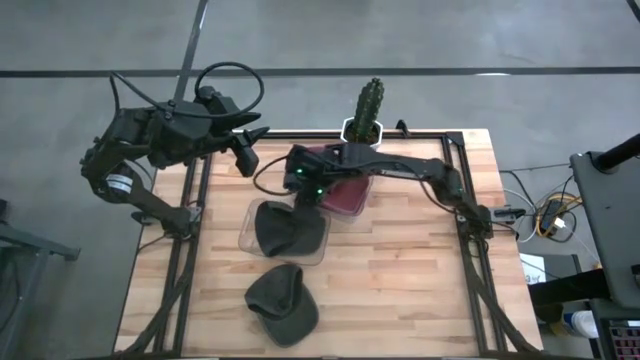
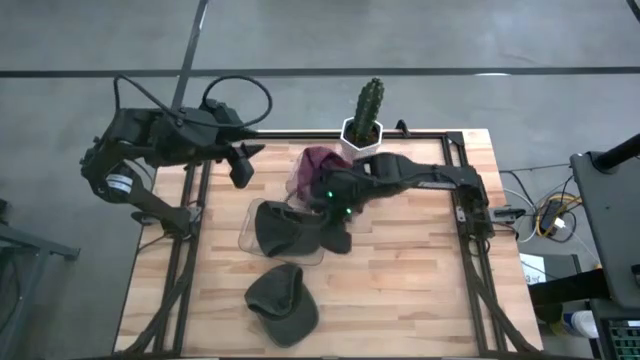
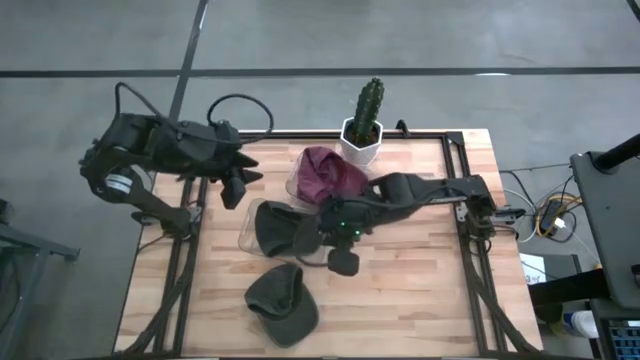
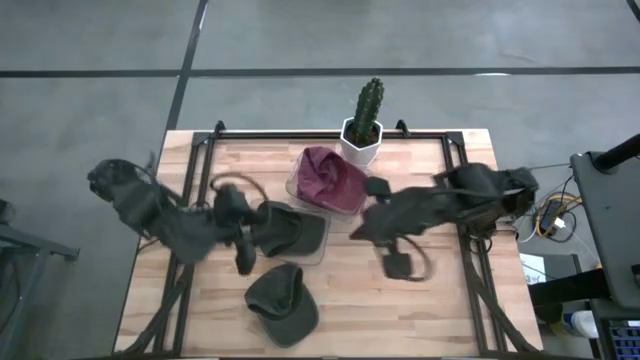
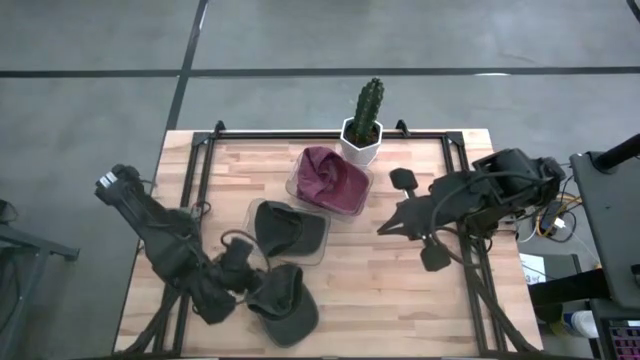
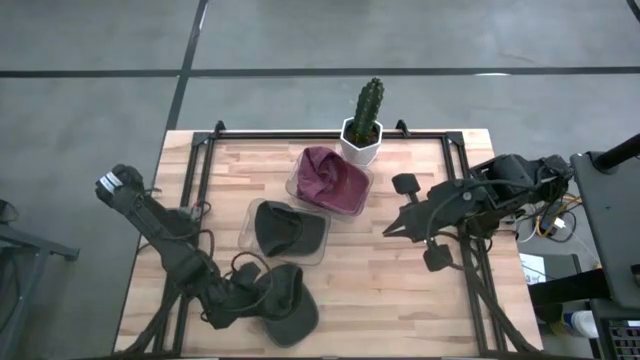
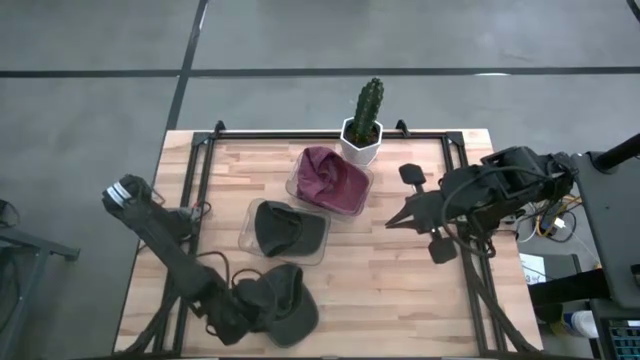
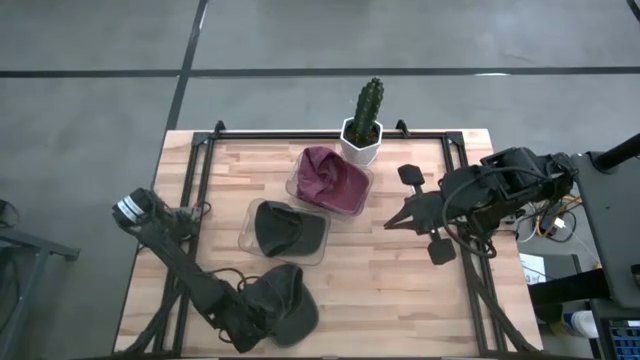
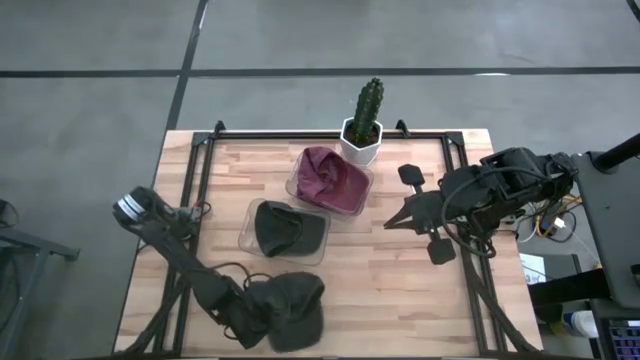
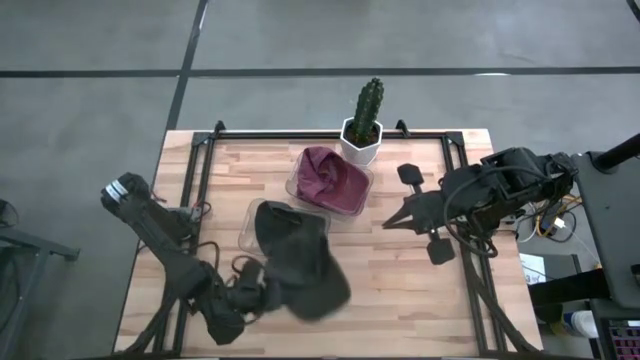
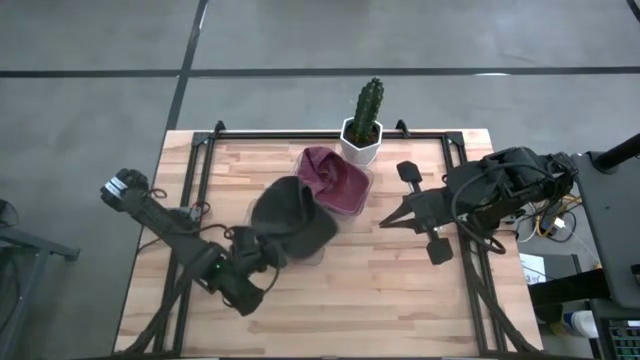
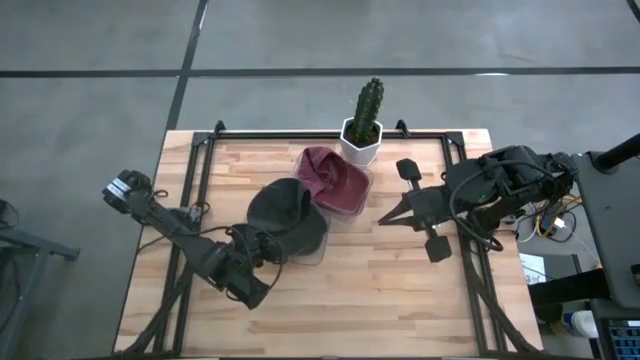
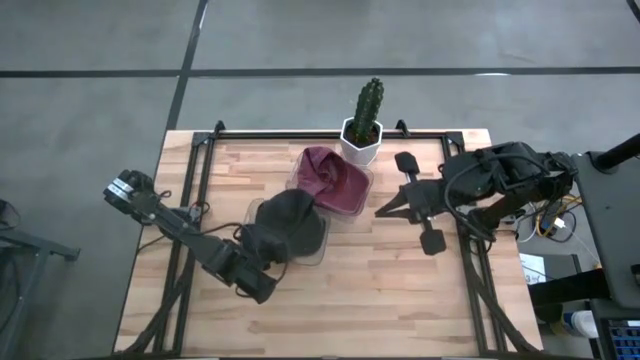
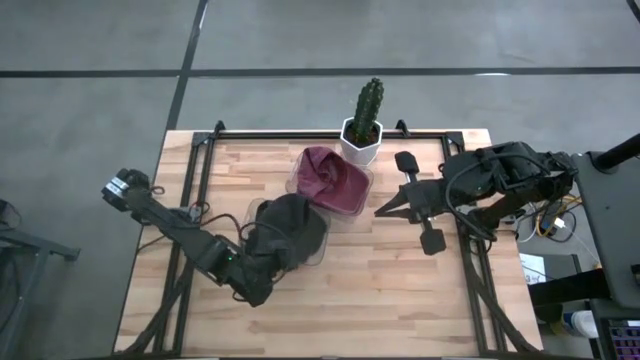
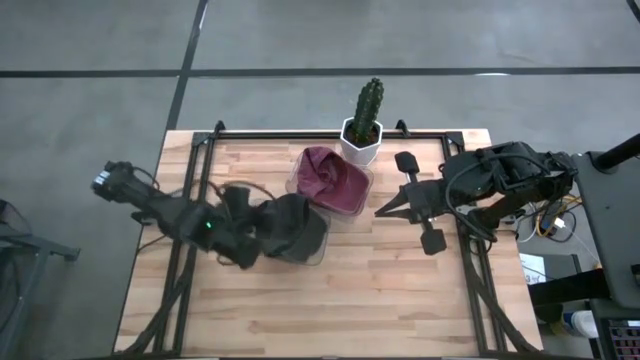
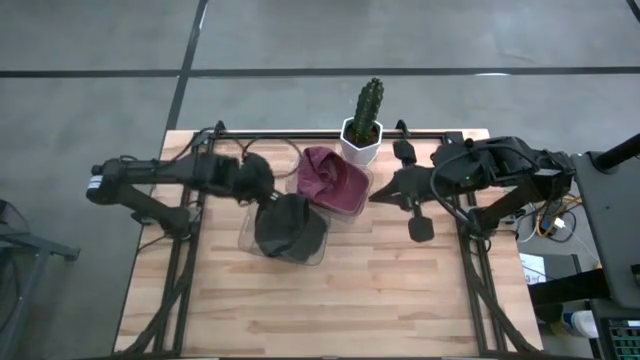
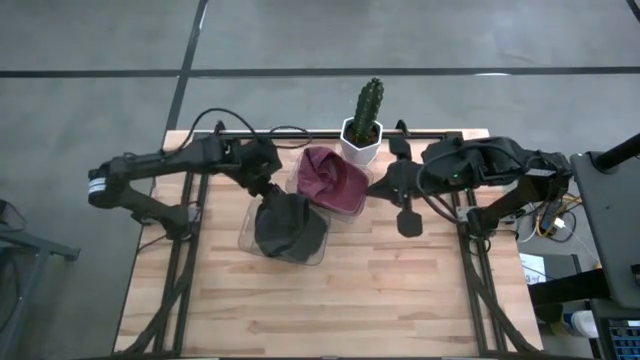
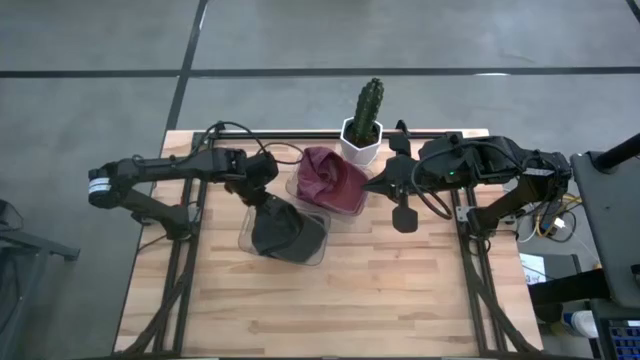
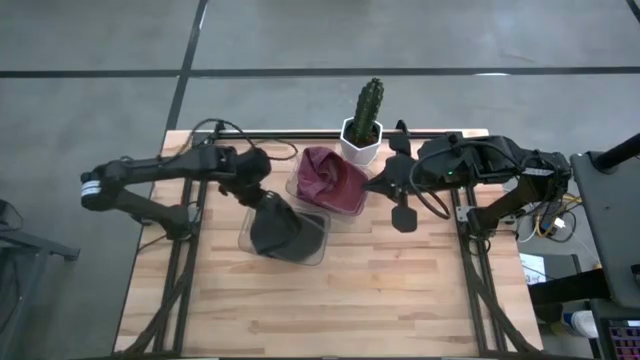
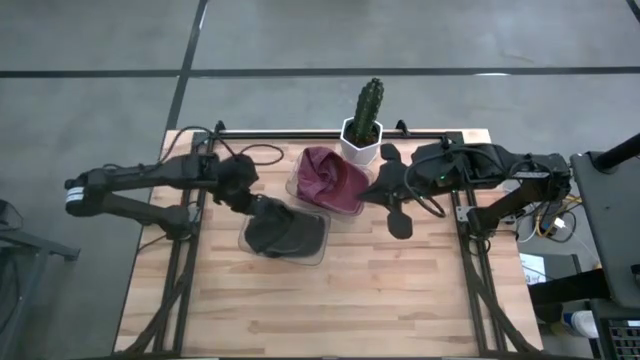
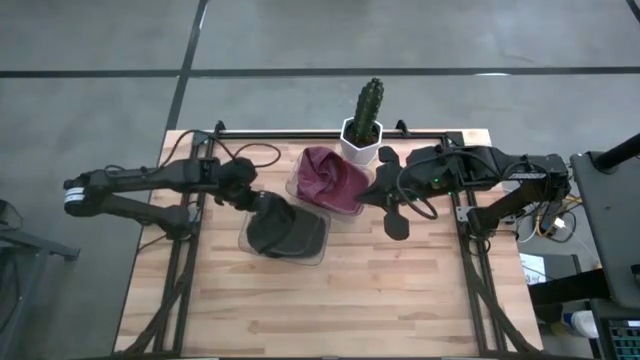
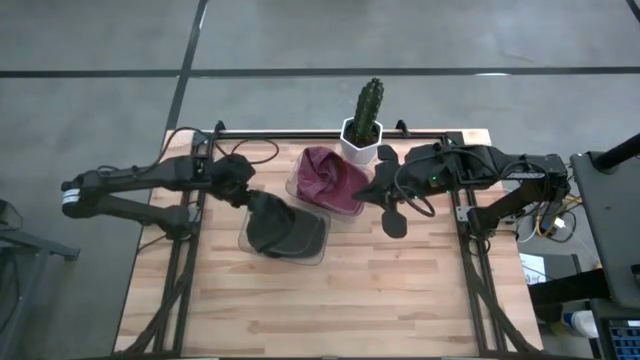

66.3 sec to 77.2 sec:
Task: Pick & Place hat
Put the black cap into the bottom transparent bin

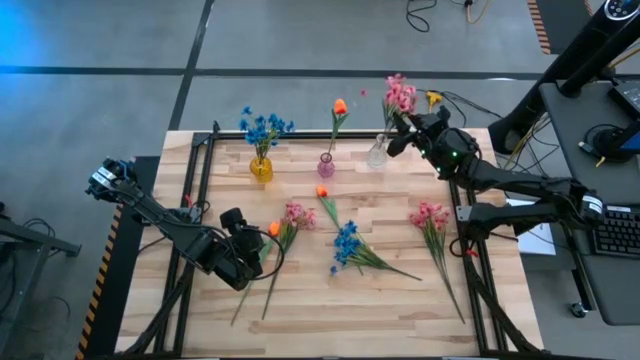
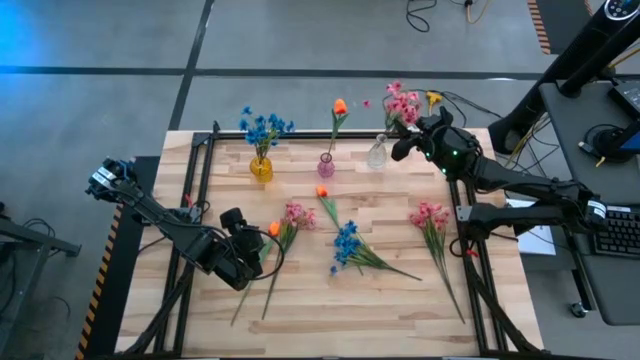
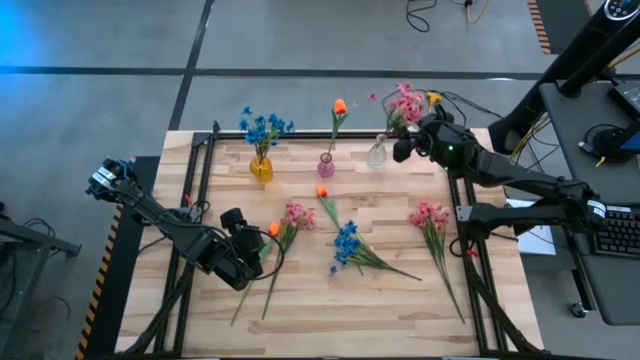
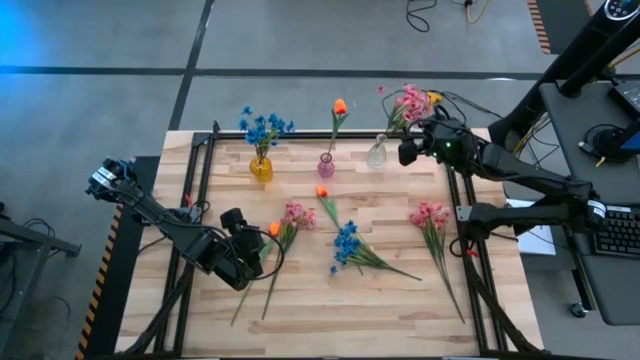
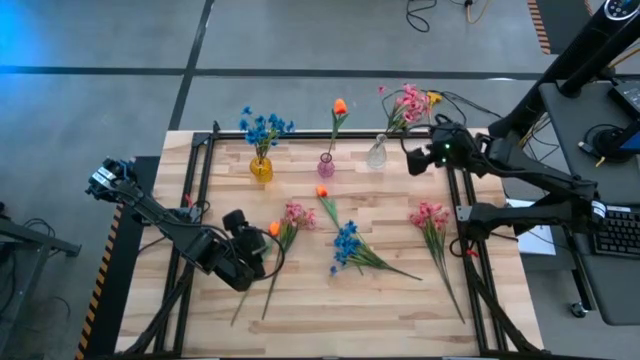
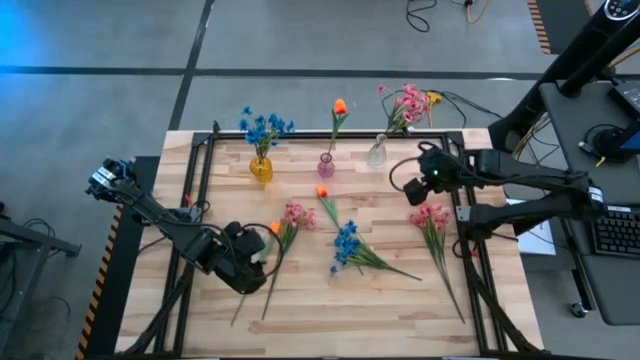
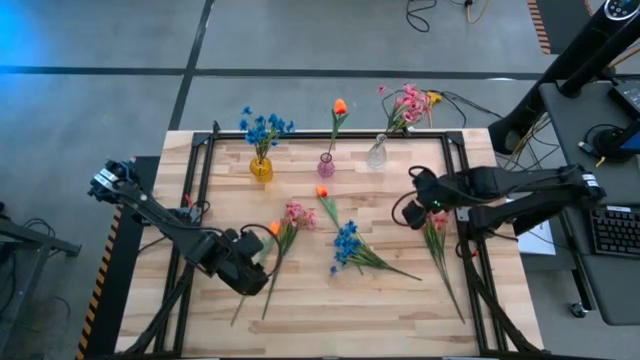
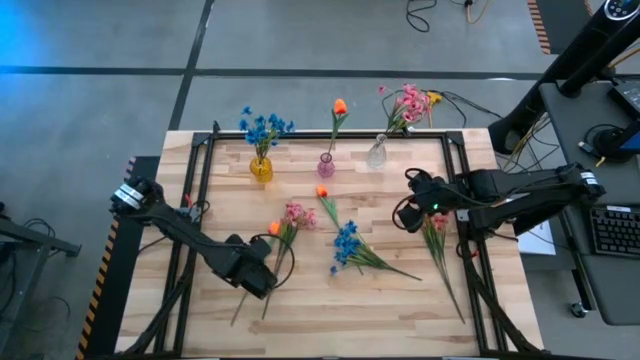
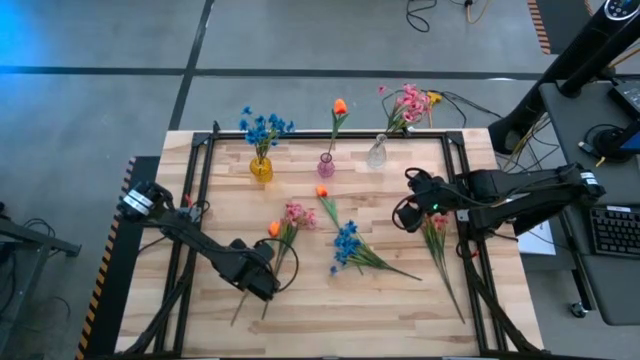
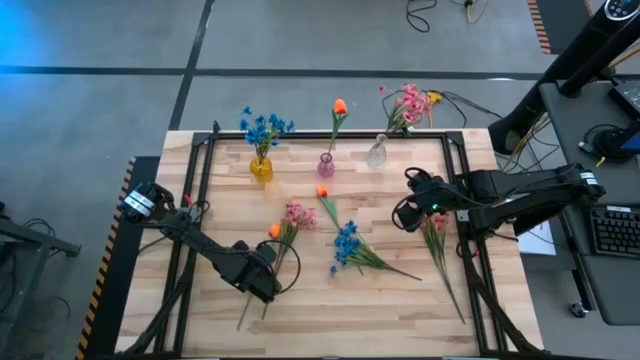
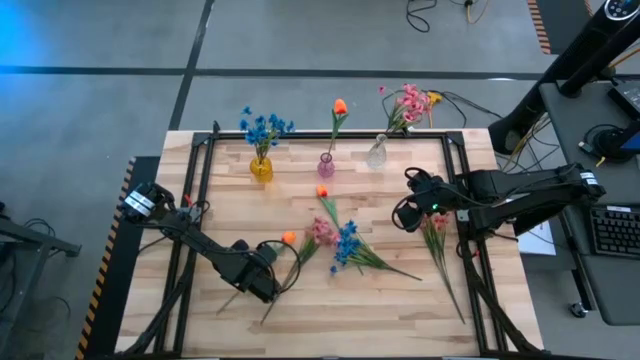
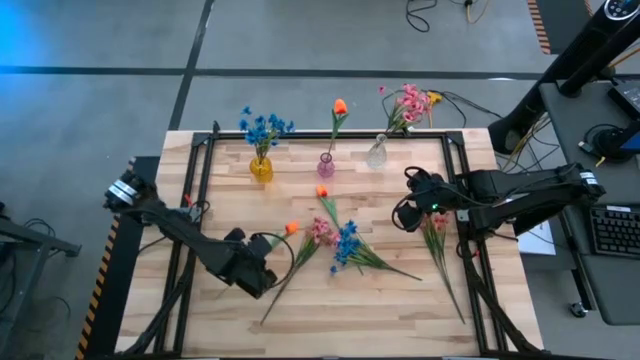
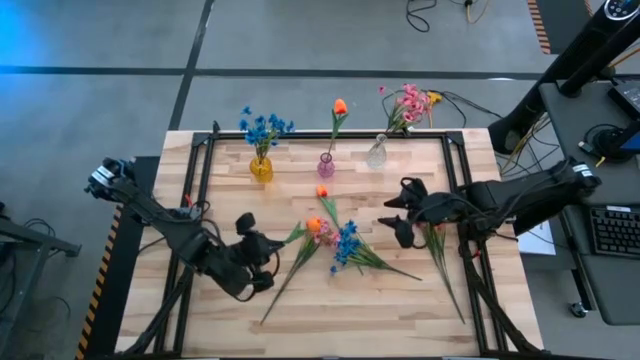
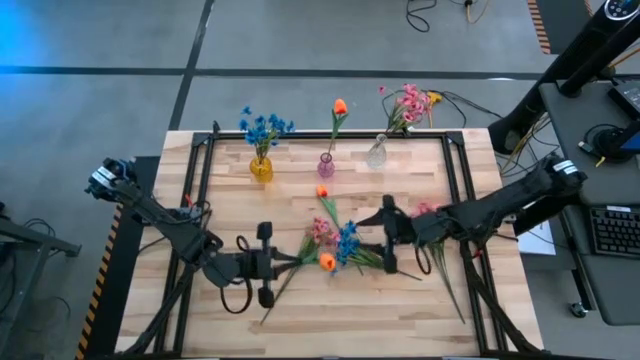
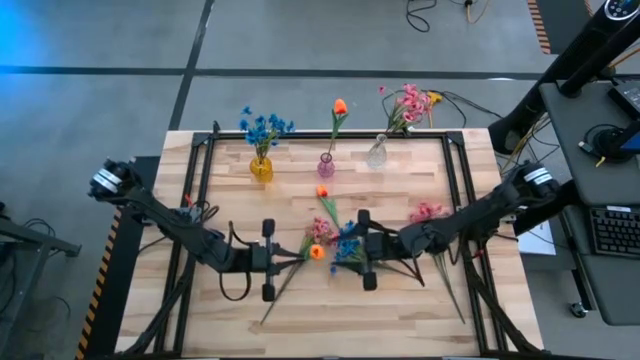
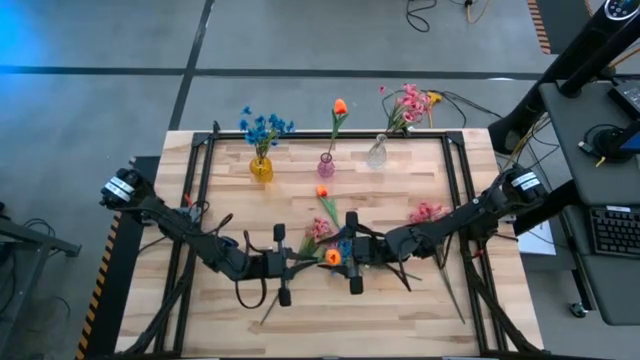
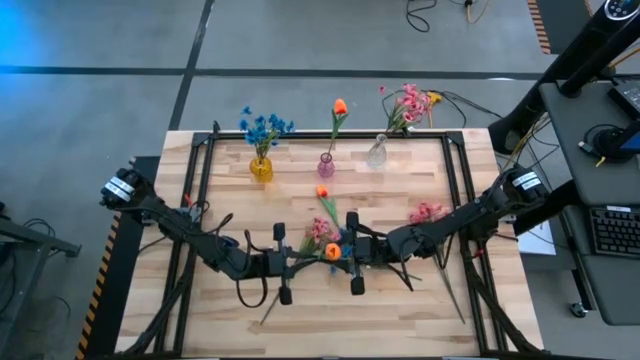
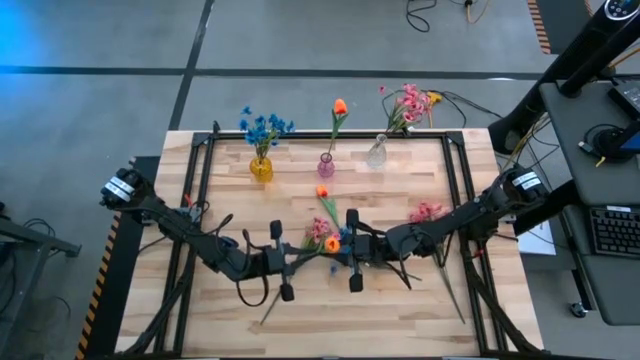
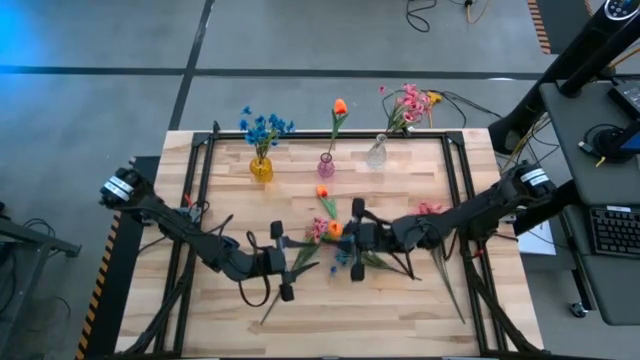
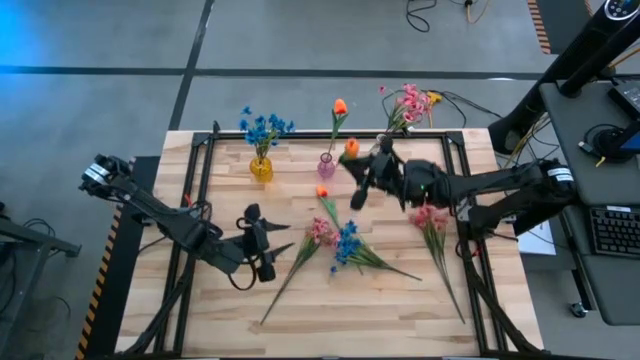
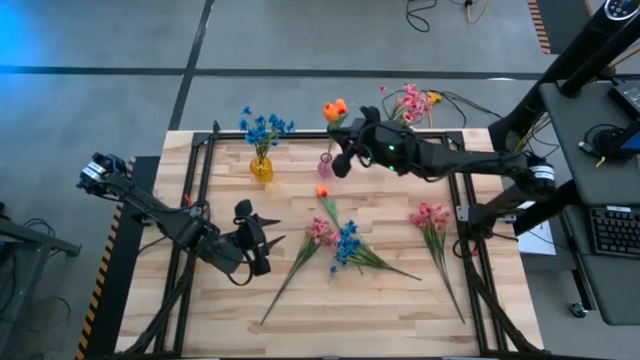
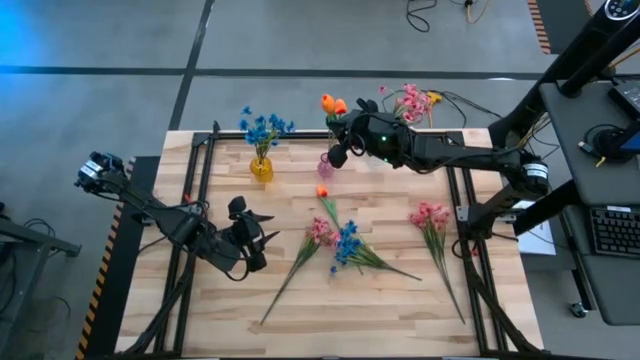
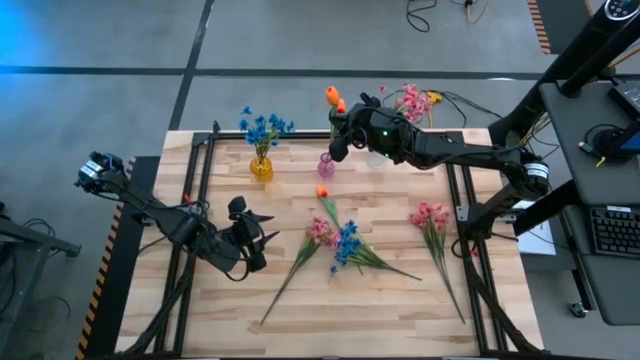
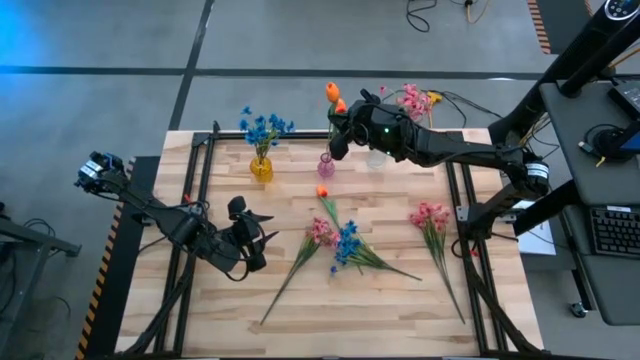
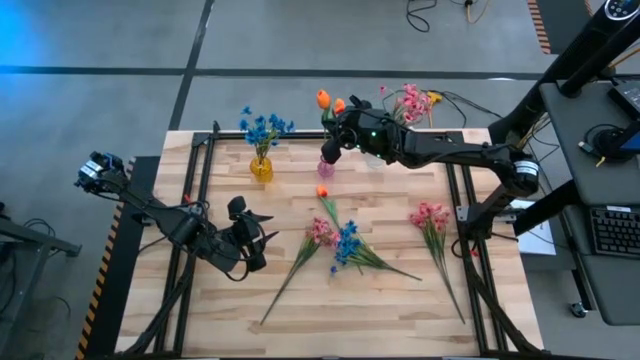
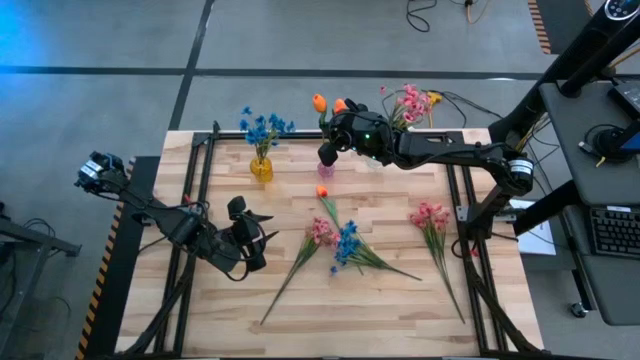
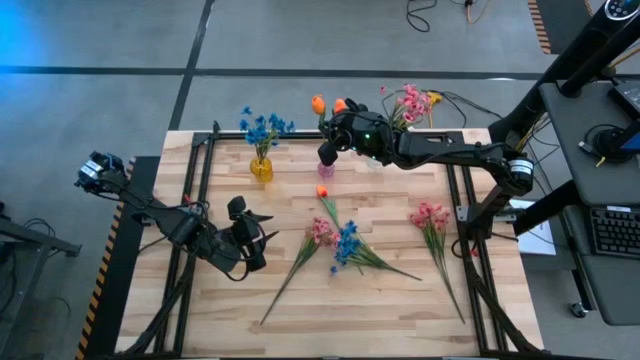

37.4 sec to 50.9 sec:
Task: Sort flowers into vase by color
Put the left orange flower into the violet vase
